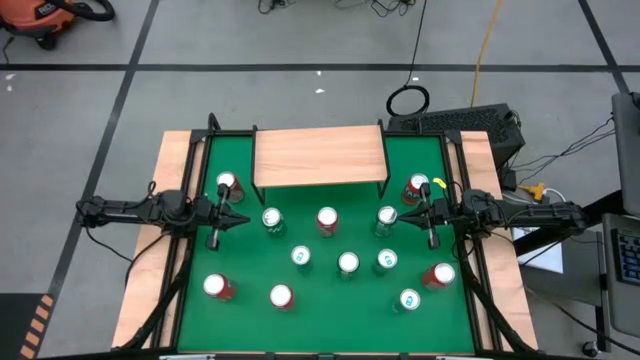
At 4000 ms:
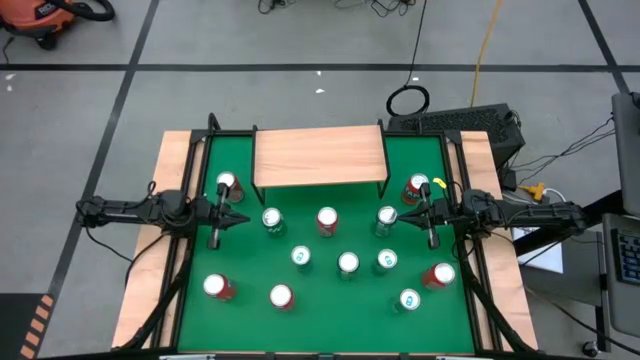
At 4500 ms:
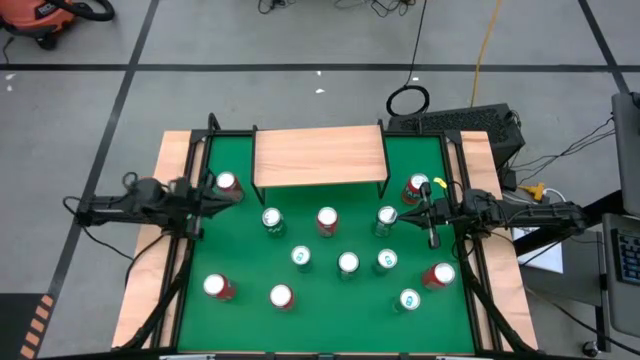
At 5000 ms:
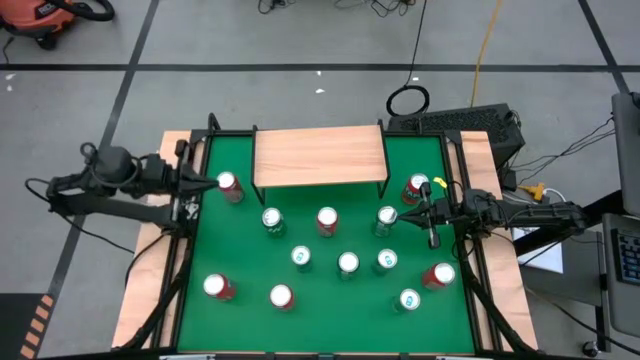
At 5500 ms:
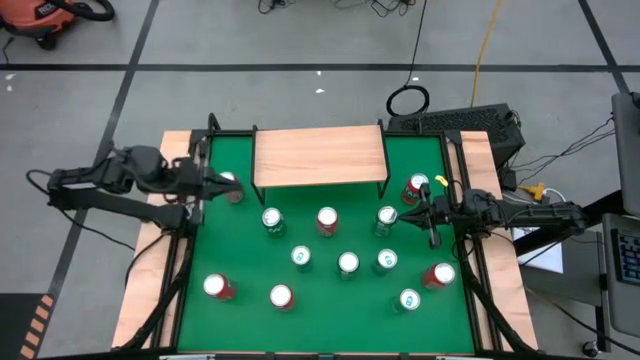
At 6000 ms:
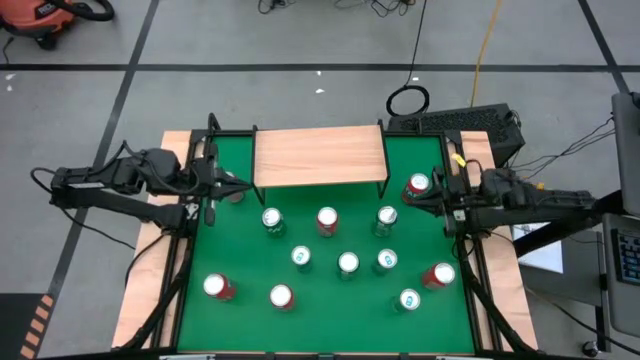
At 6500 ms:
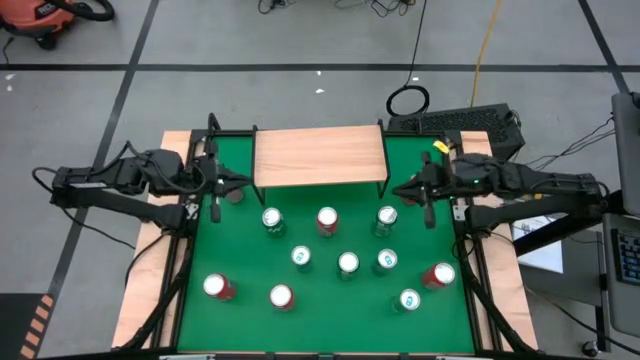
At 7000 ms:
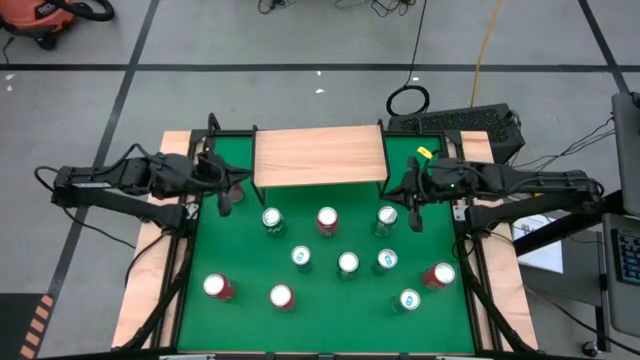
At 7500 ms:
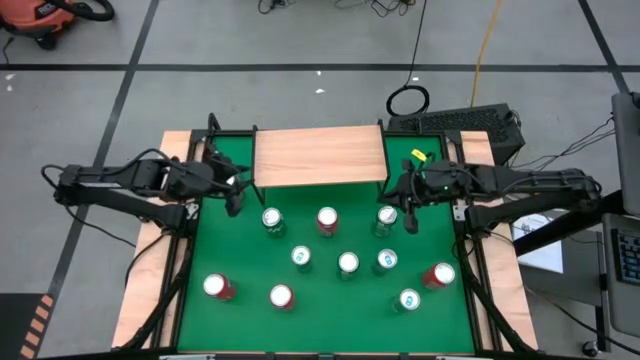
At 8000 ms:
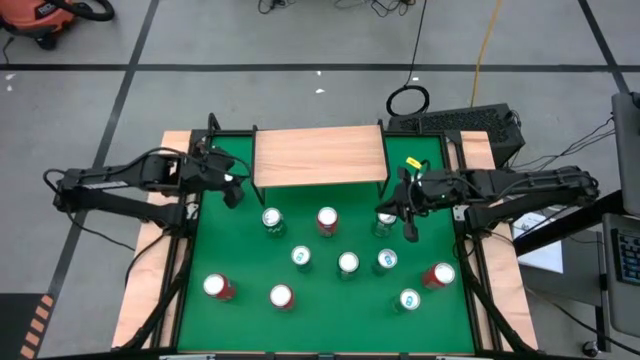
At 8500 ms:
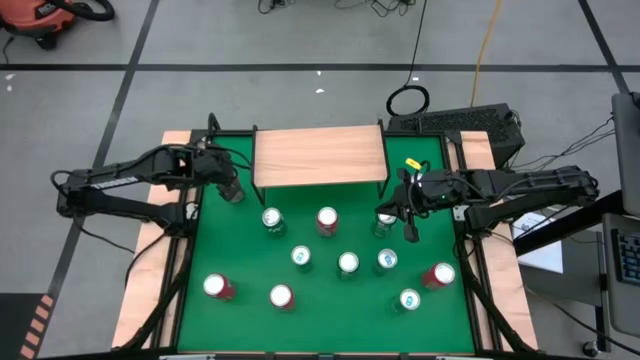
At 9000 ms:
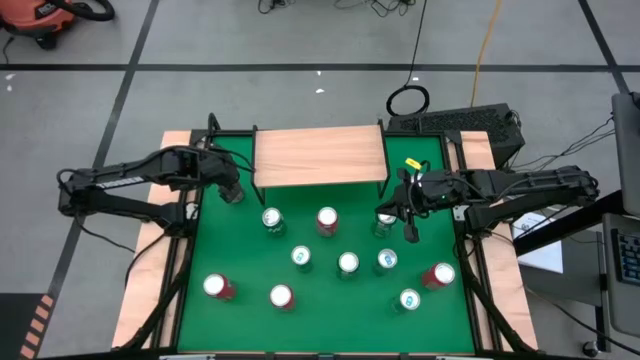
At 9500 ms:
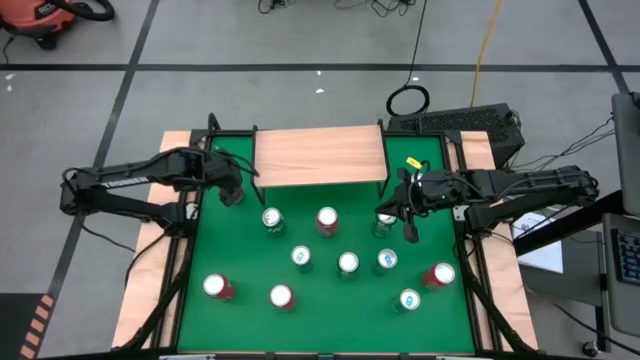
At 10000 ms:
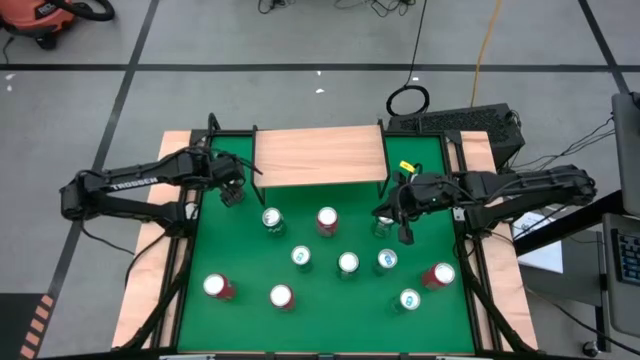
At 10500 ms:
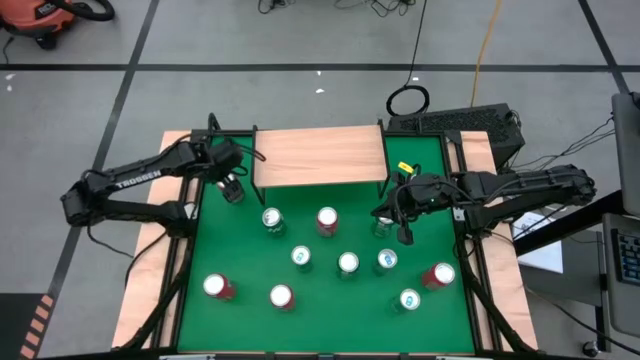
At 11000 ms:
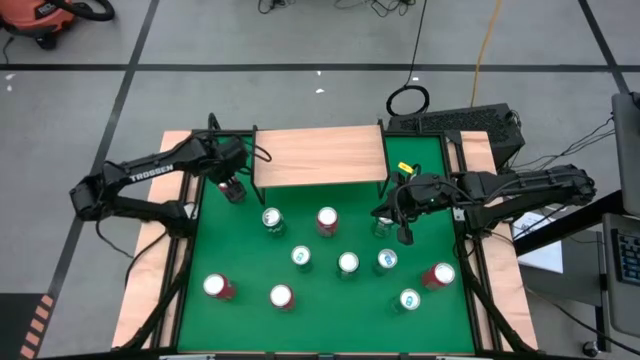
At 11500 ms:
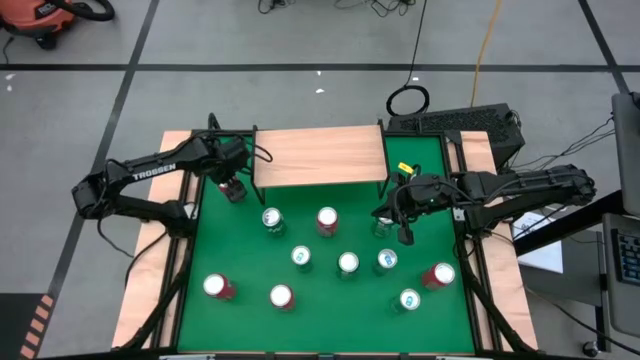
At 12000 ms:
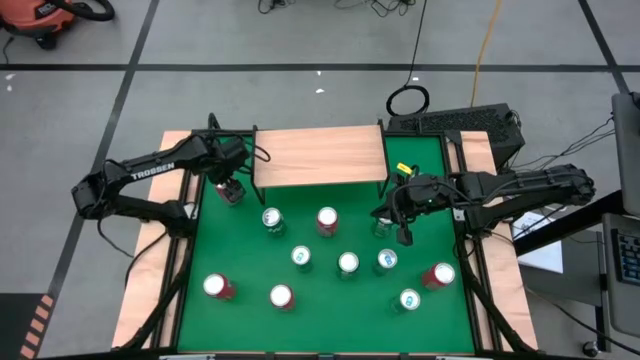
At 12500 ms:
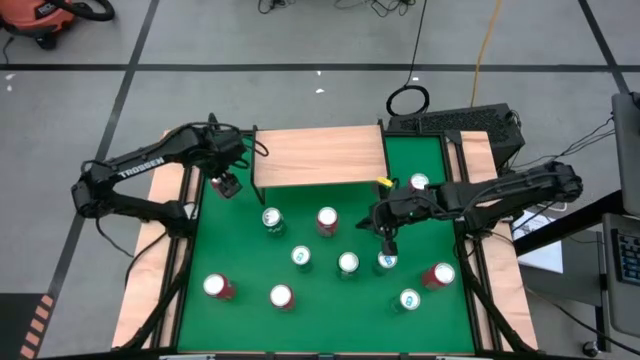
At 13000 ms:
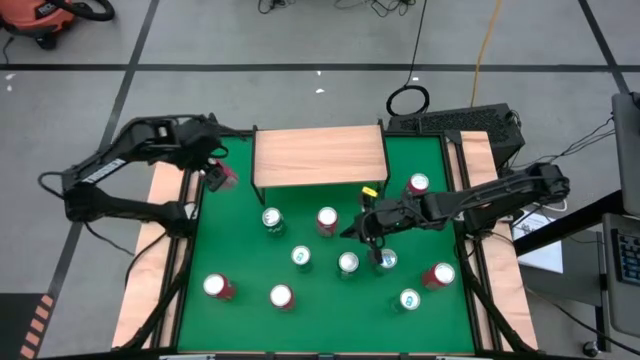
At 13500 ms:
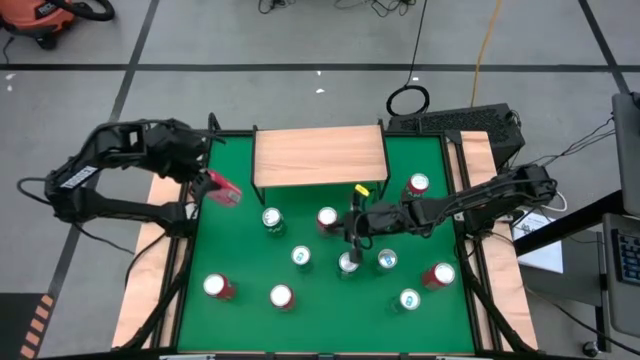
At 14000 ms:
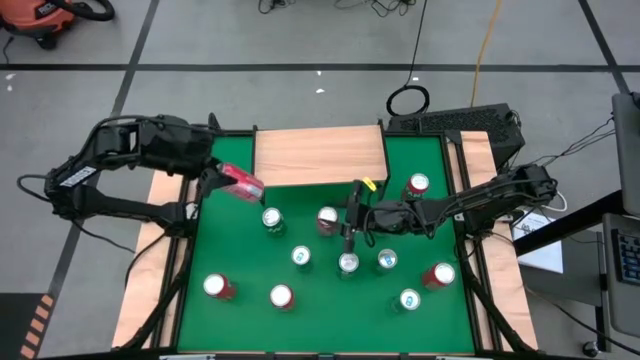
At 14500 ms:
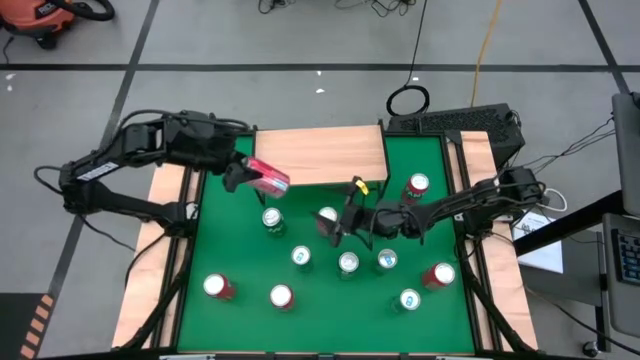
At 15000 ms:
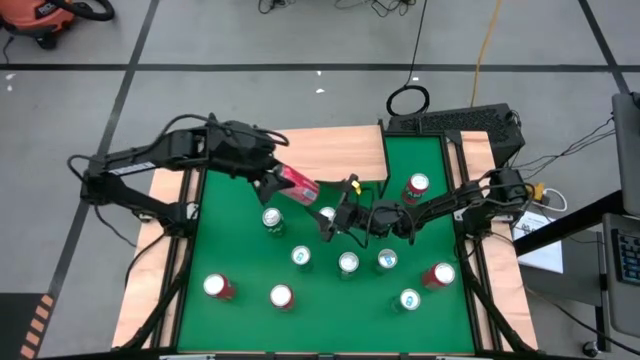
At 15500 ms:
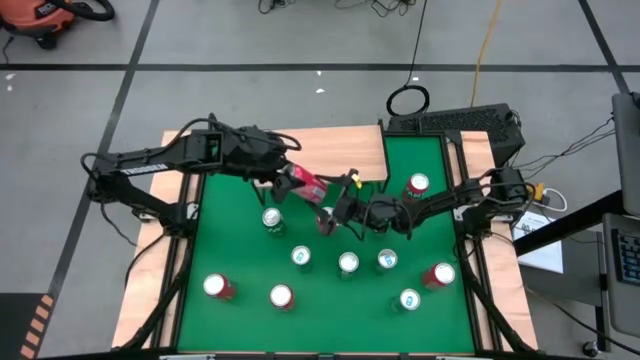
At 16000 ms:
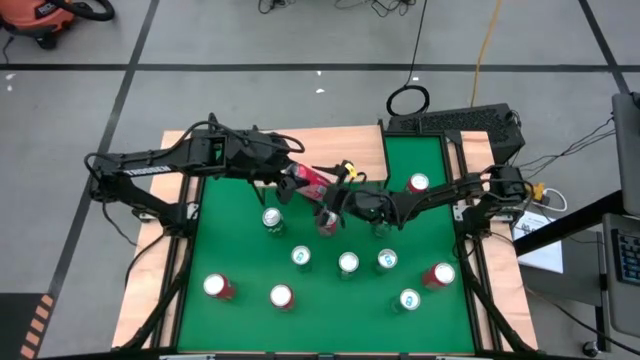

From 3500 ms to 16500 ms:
Task: Place canned beverage on shelf
Put the red soda can on the shelf

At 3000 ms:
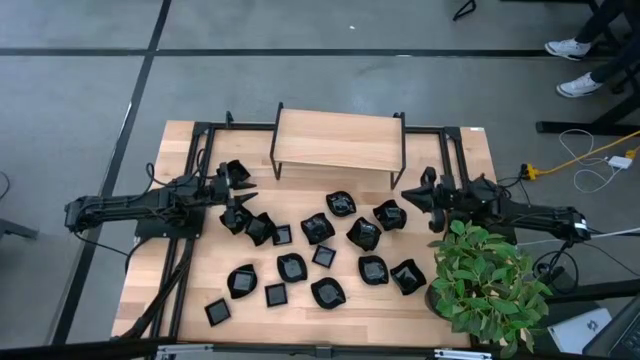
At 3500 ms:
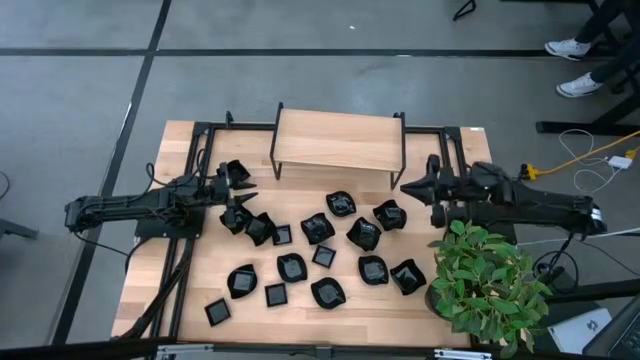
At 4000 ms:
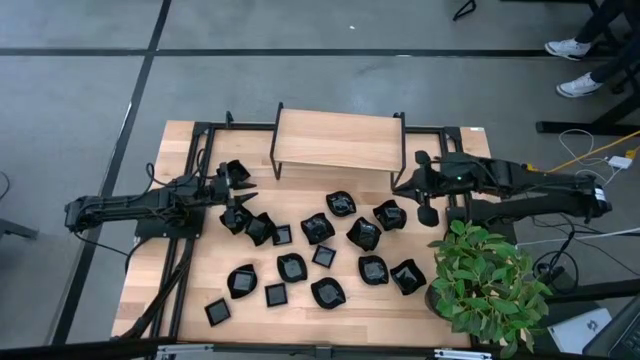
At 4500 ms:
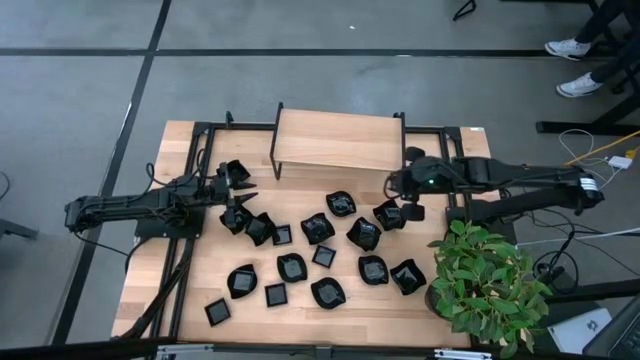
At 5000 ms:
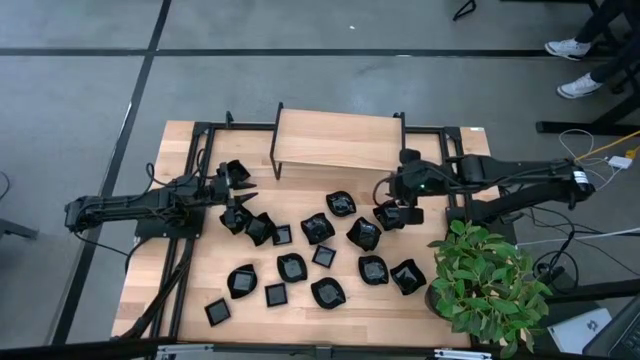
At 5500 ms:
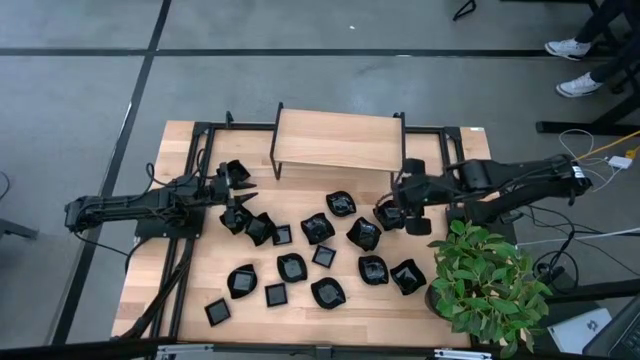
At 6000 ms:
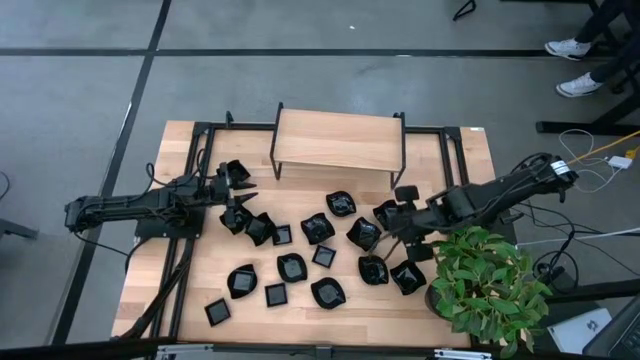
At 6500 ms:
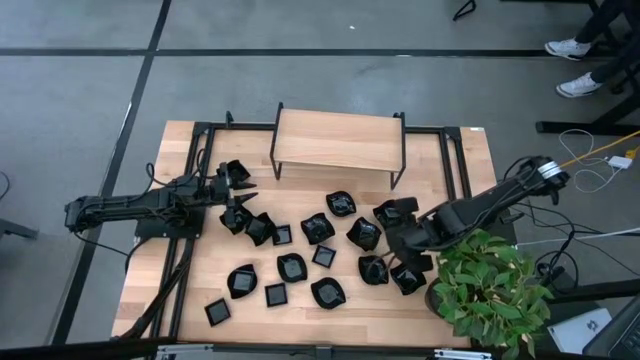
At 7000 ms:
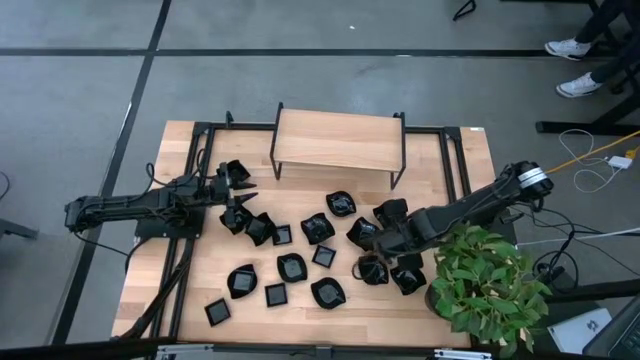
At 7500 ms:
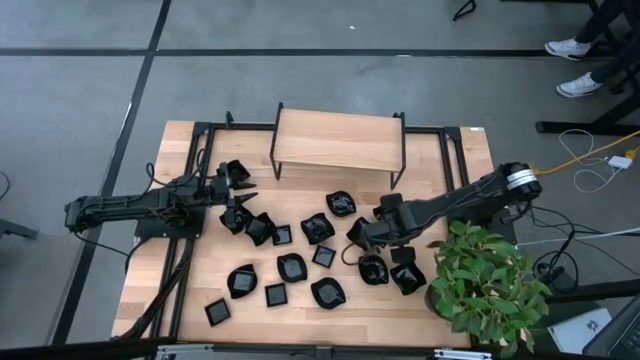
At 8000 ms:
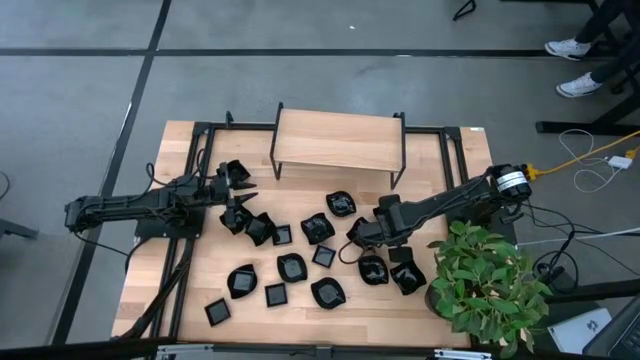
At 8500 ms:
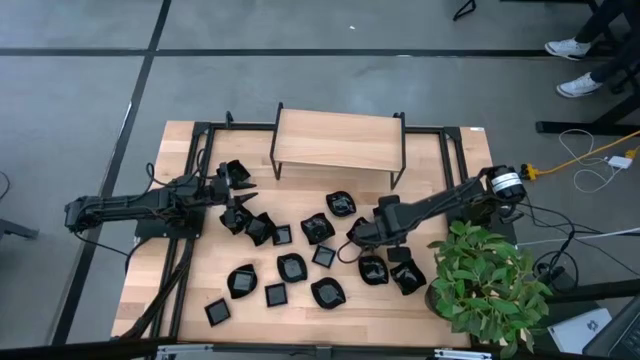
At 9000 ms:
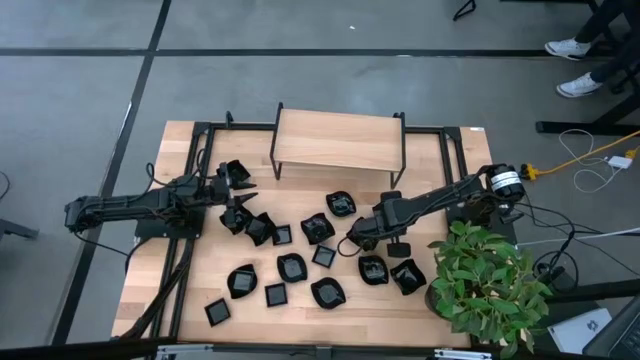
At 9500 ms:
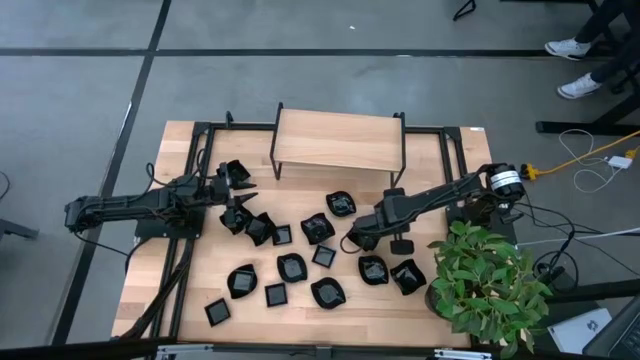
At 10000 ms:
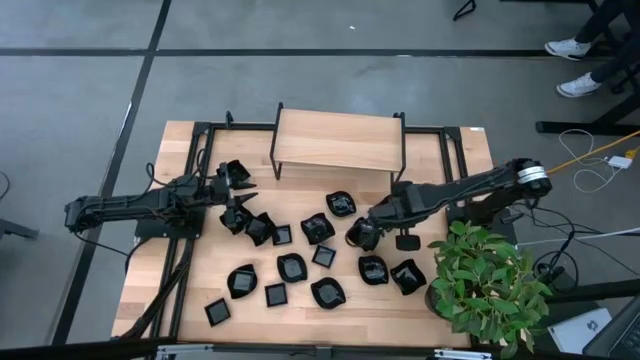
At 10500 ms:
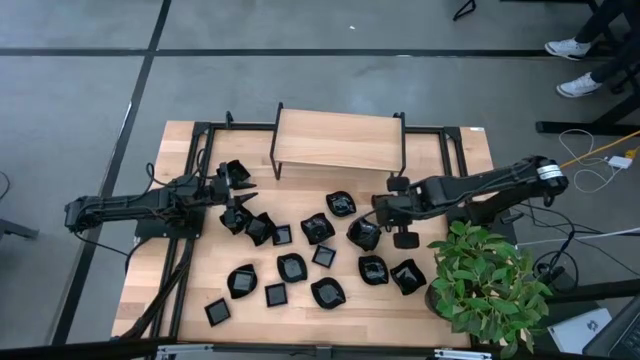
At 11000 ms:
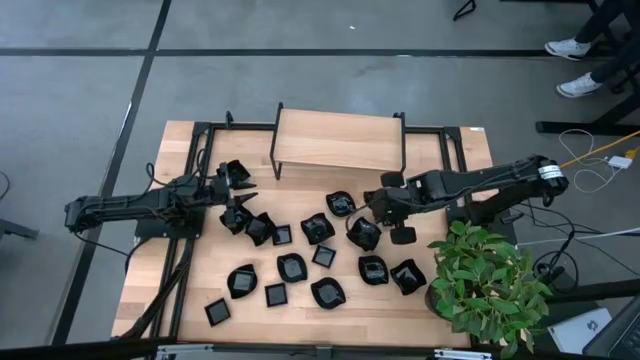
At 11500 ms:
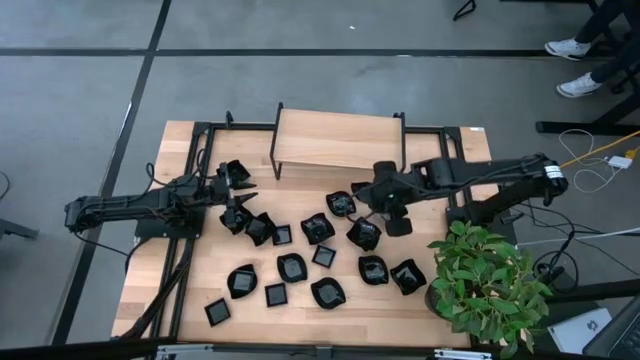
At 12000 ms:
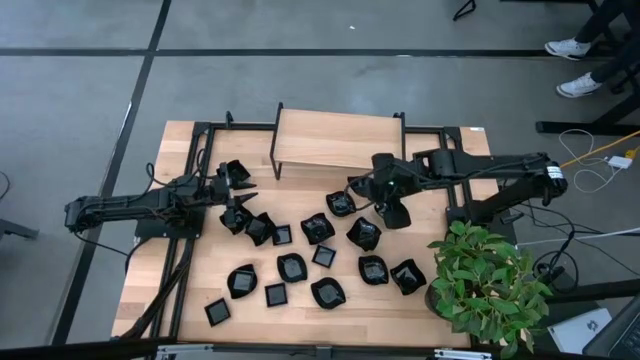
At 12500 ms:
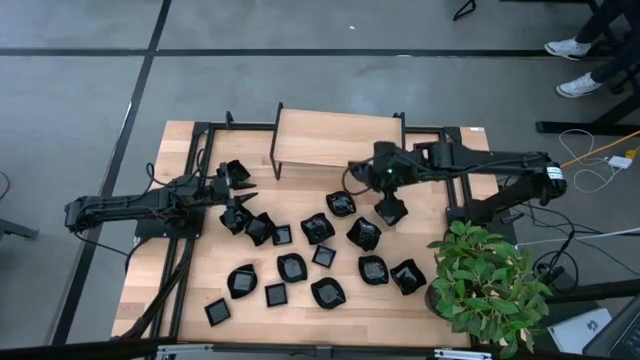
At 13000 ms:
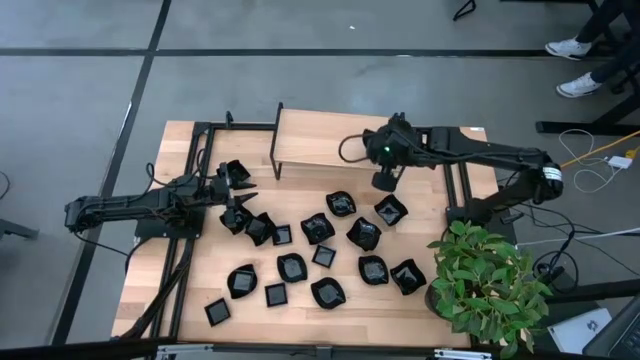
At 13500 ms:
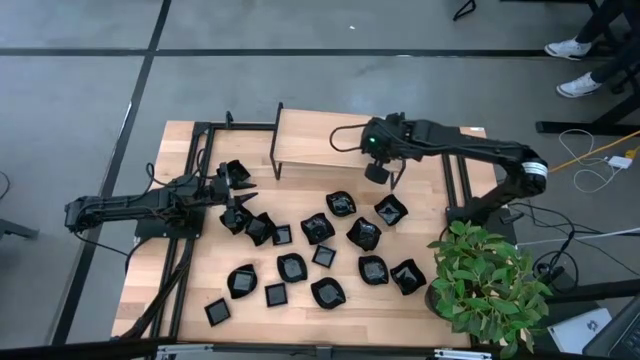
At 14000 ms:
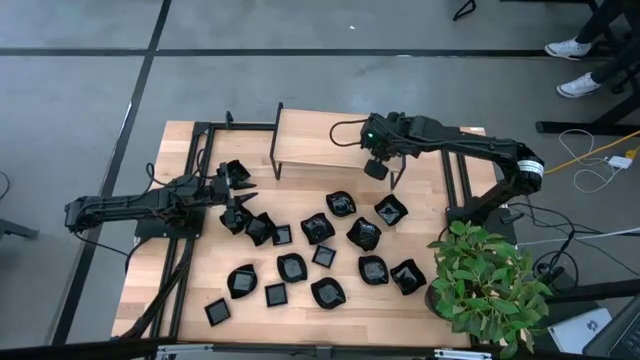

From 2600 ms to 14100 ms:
Task: Pick & Place Mini shaped plates
Put the leaf-shaped plate on the shelf
